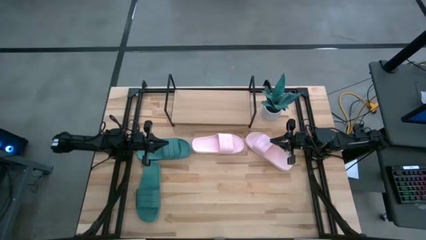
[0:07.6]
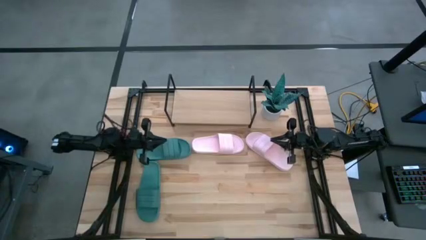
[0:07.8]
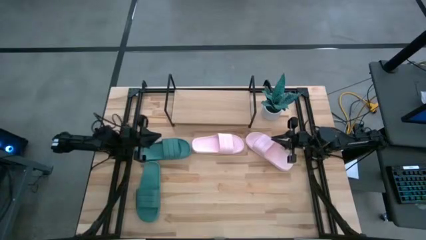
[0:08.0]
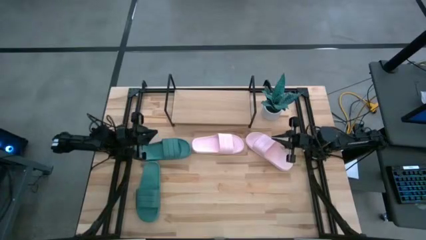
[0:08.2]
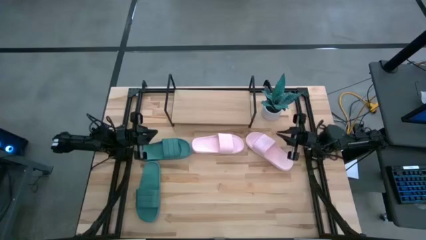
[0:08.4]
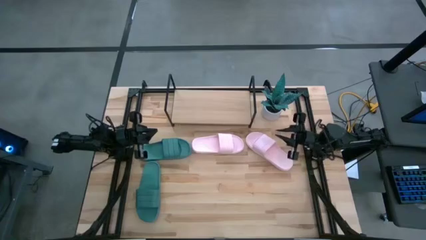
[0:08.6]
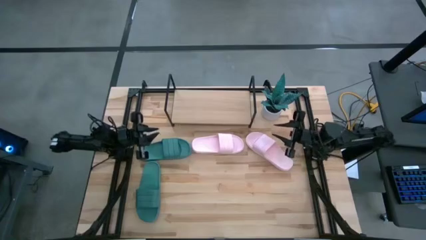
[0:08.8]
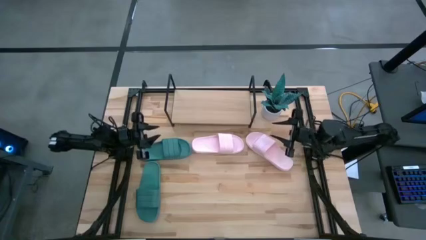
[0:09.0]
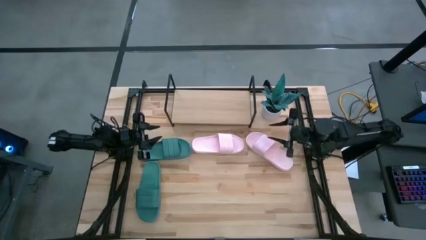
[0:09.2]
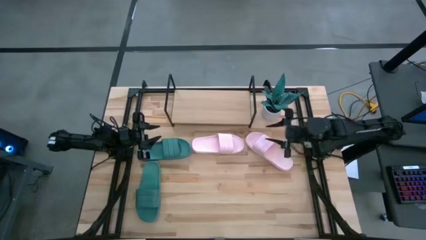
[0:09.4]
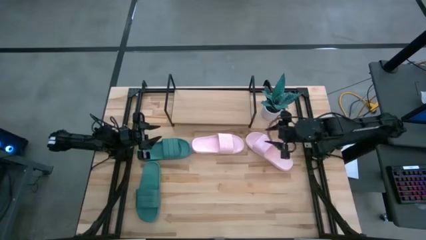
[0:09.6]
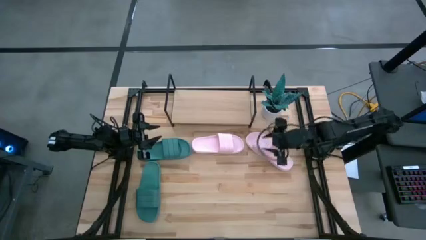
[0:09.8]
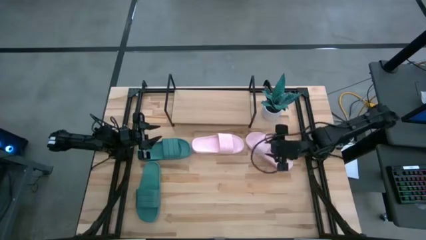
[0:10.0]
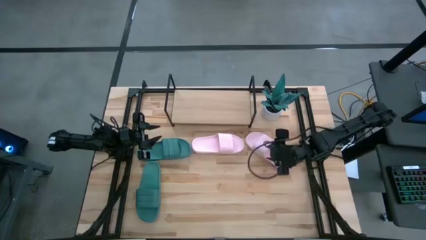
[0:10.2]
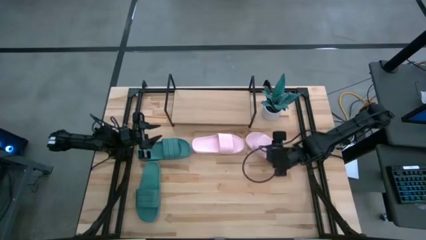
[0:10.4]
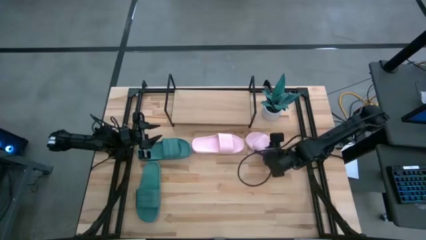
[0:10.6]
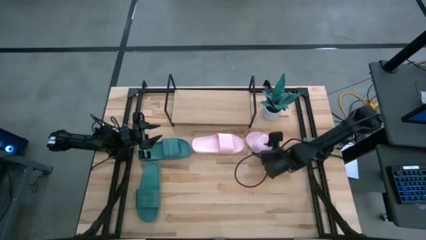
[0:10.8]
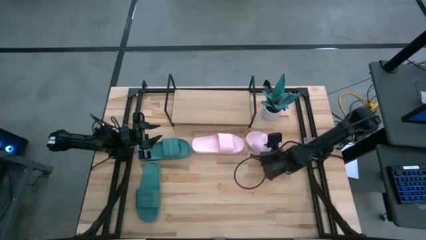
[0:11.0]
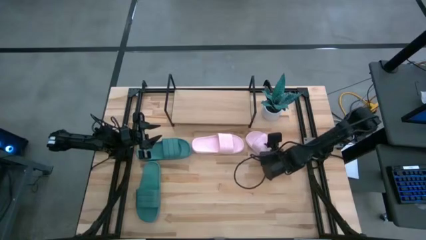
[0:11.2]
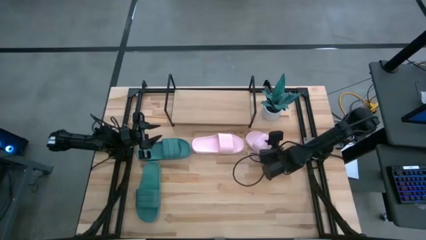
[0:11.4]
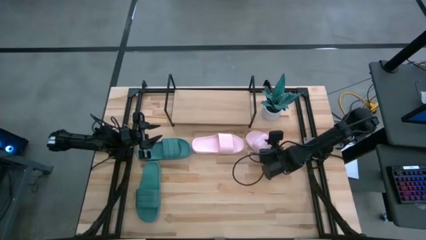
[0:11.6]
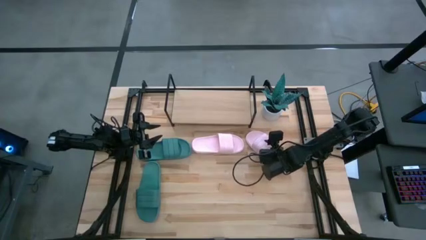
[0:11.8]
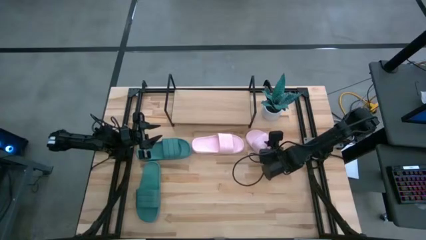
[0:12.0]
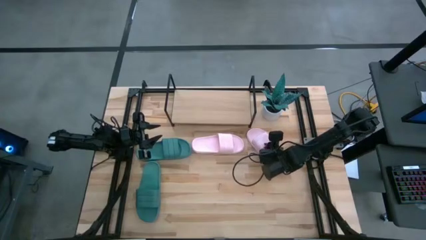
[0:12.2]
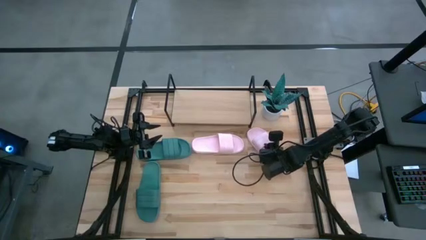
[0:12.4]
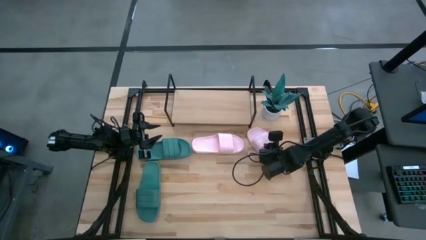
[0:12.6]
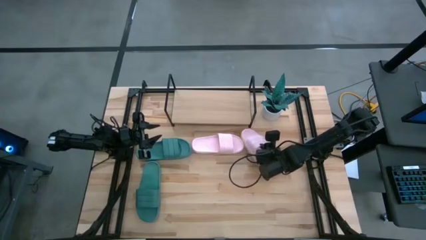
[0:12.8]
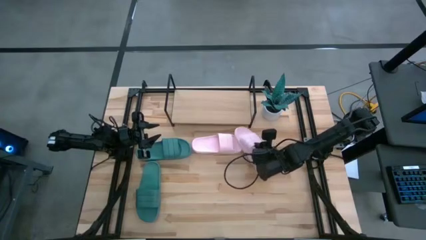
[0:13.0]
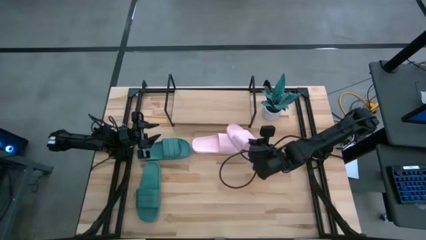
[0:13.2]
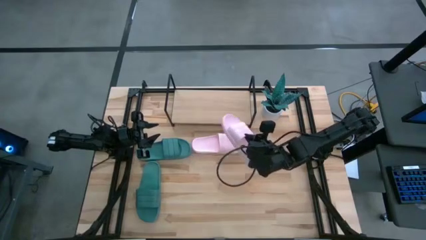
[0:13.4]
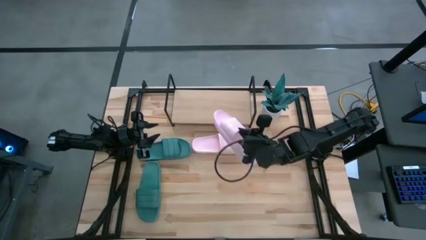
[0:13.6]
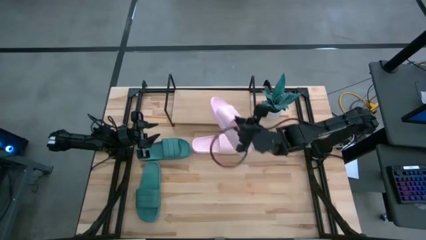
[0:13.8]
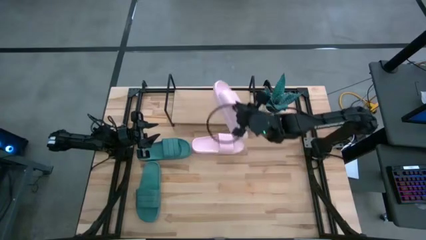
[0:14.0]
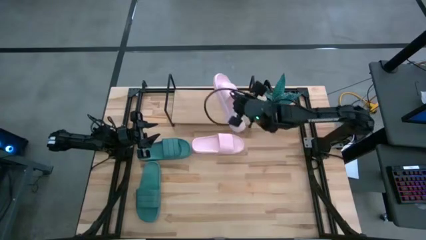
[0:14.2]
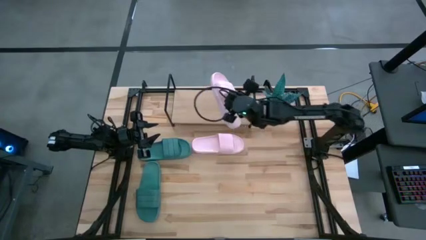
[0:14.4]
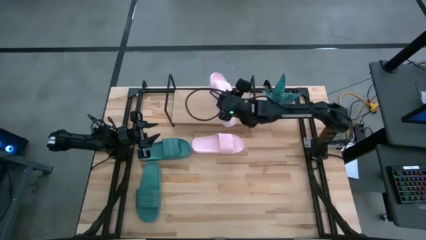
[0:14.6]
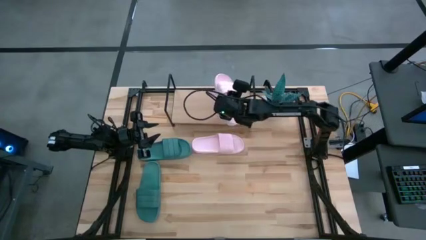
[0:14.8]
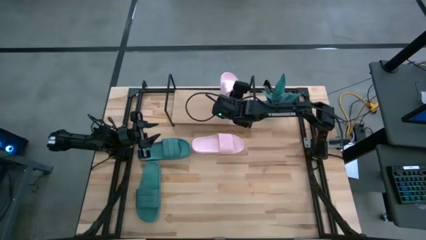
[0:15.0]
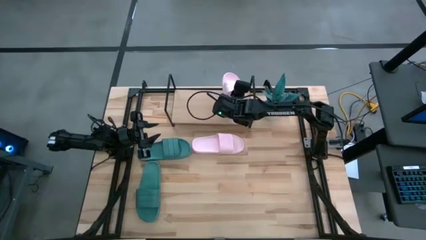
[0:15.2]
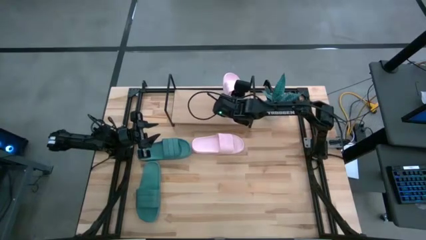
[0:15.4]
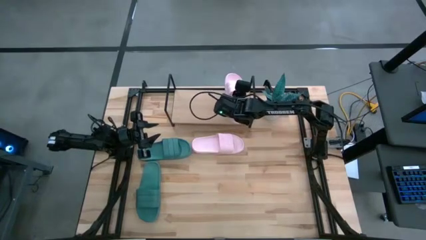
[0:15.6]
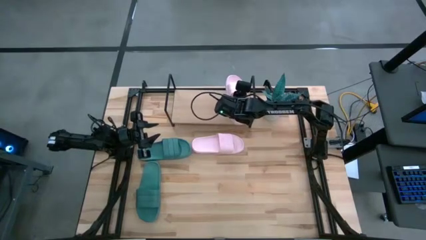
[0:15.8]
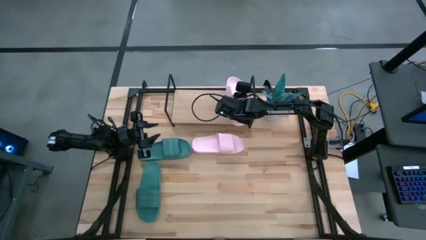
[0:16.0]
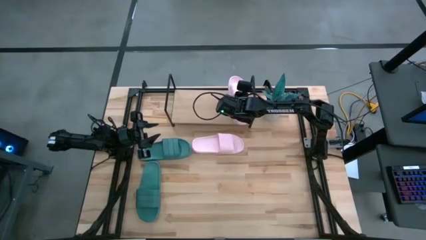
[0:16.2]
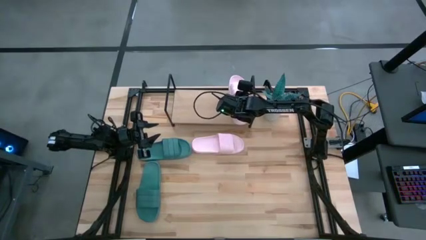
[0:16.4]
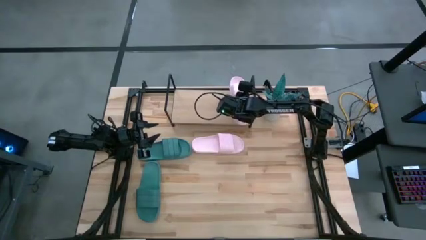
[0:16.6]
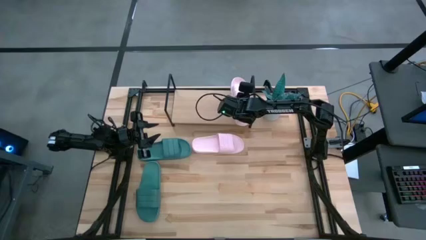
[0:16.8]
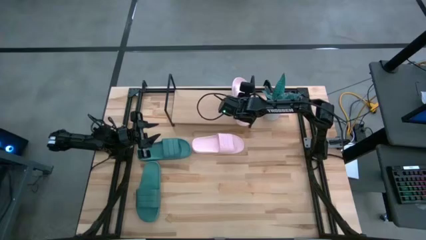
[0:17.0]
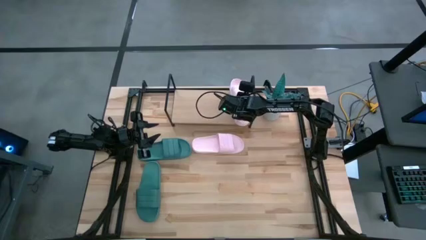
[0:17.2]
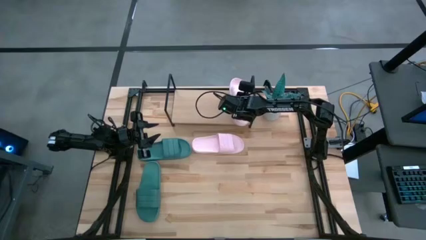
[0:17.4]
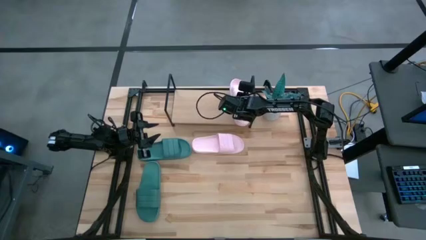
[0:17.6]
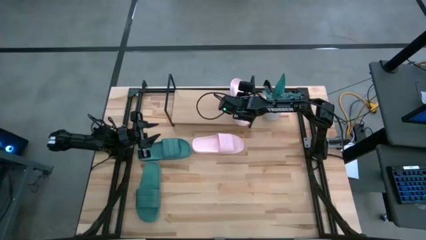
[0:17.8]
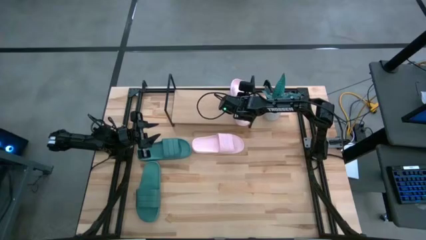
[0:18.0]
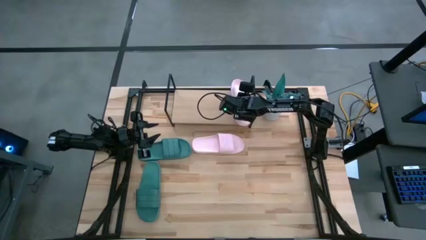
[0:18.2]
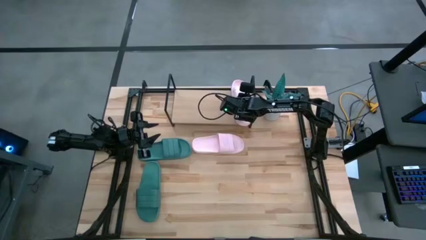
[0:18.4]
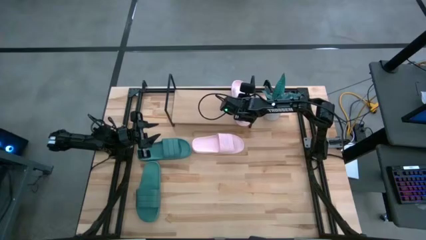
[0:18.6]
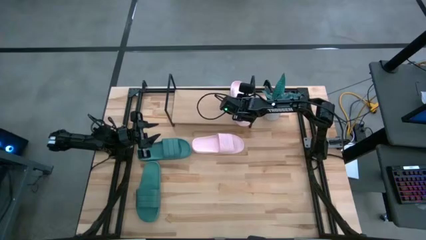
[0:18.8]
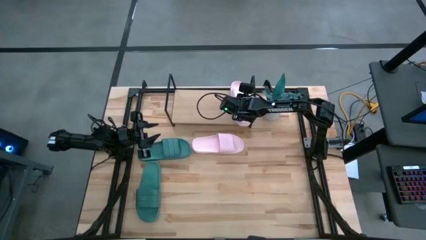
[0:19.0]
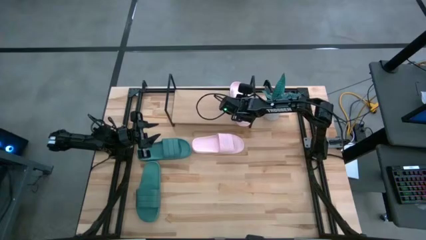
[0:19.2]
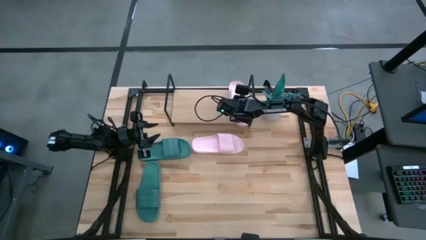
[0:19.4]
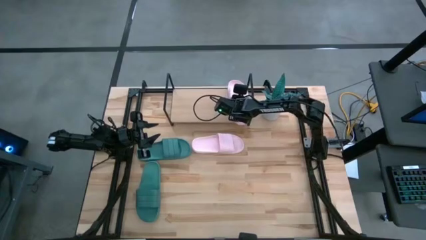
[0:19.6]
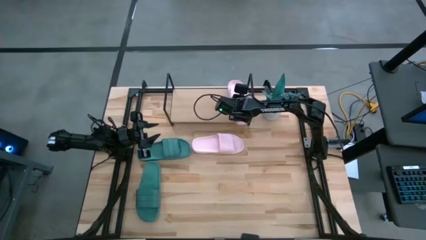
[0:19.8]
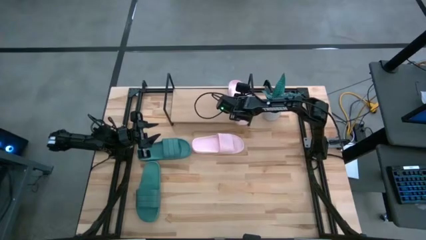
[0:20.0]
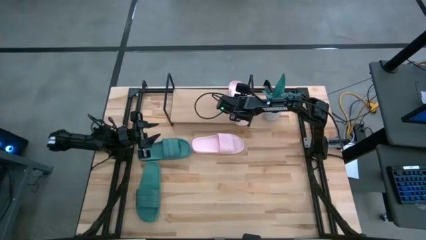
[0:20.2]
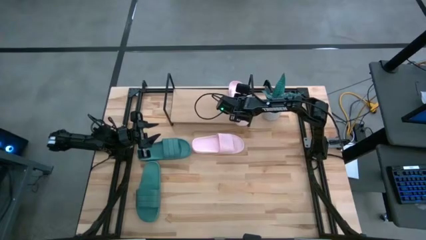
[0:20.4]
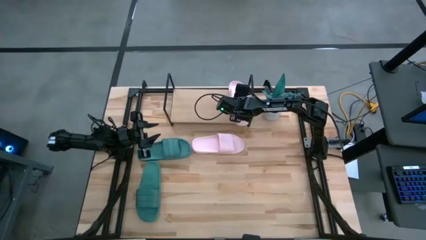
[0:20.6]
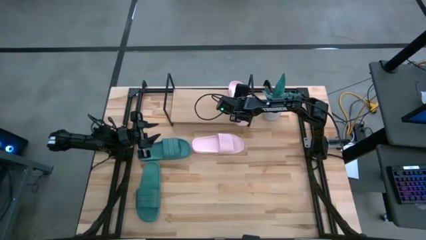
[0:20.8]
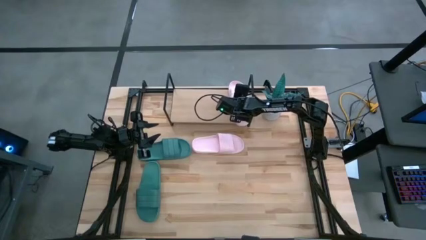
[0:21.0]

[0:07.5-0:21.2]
Task: Pick and place slides into the shelf
Put the right pink slipper on the shelf
